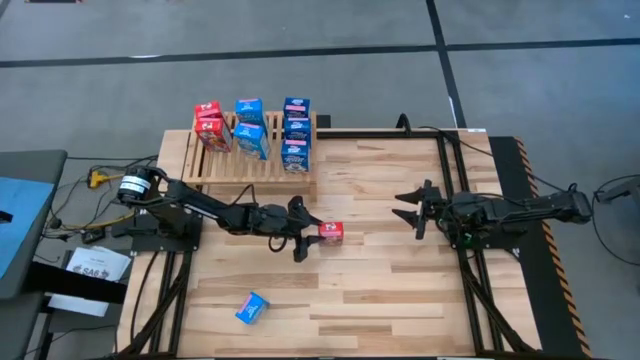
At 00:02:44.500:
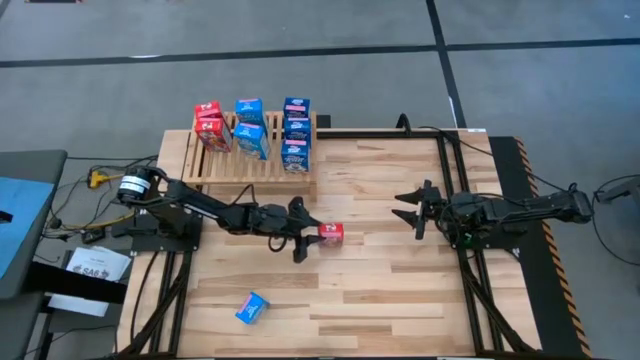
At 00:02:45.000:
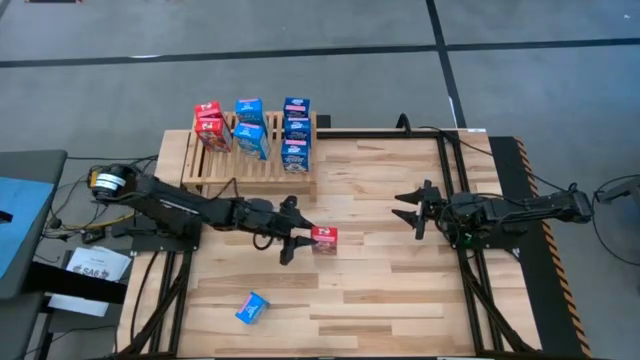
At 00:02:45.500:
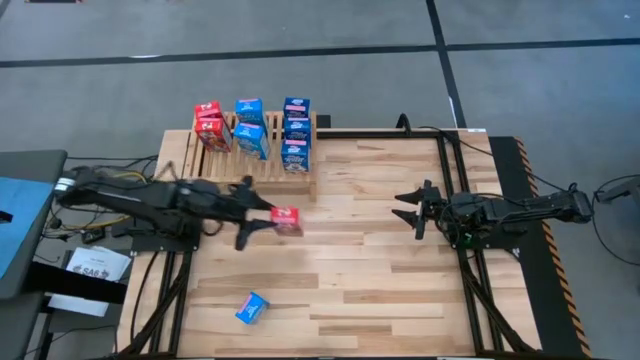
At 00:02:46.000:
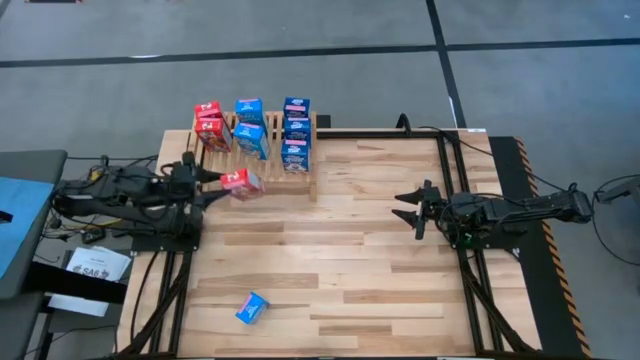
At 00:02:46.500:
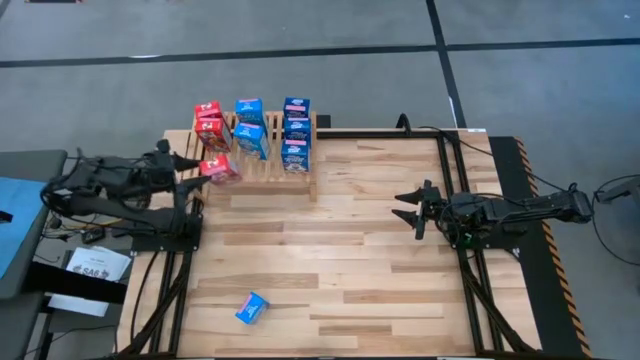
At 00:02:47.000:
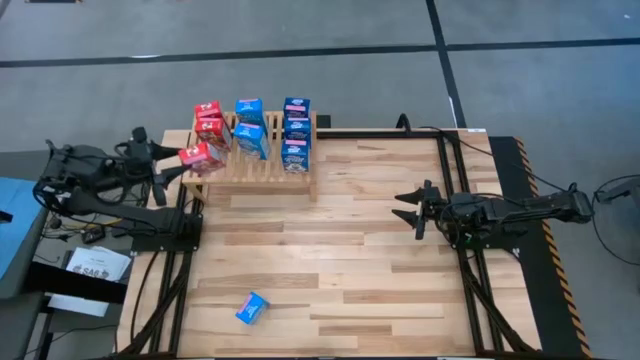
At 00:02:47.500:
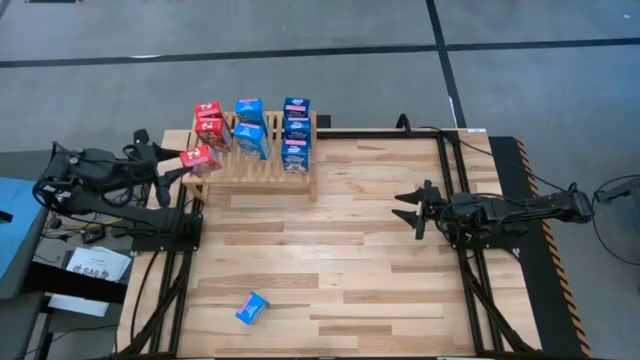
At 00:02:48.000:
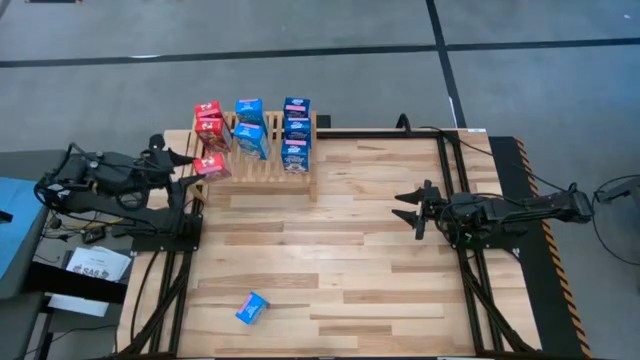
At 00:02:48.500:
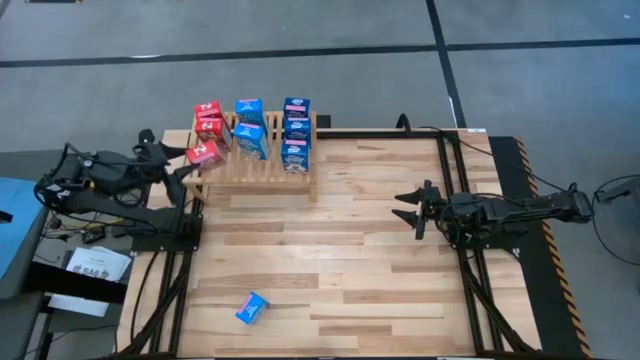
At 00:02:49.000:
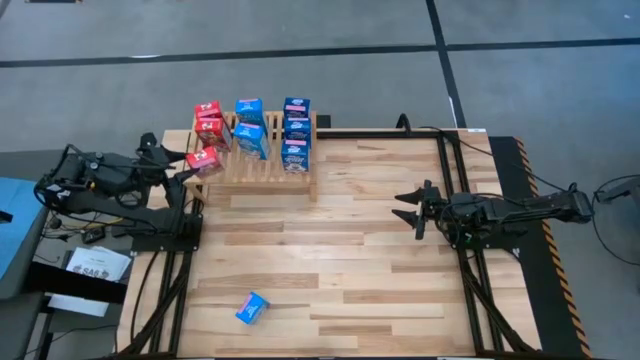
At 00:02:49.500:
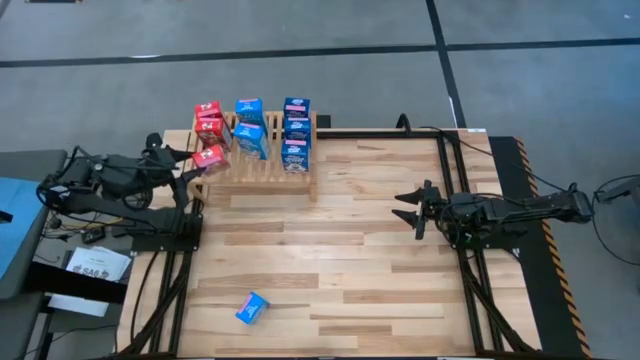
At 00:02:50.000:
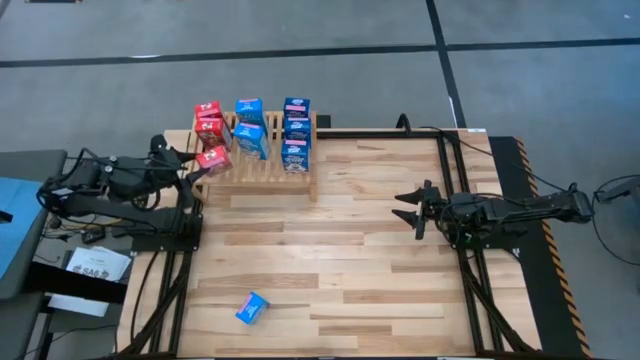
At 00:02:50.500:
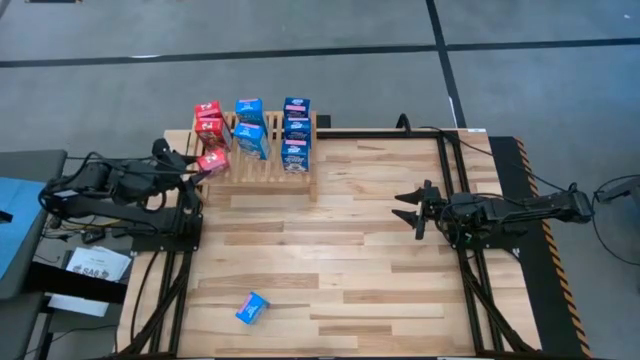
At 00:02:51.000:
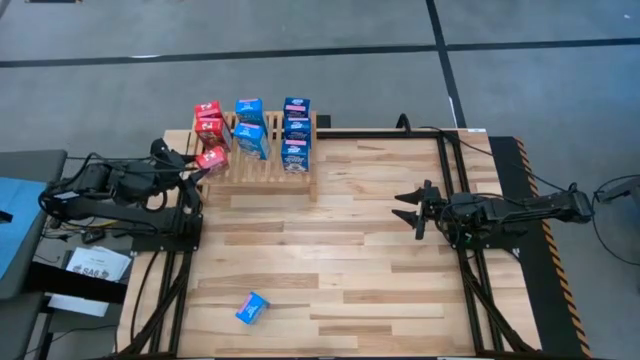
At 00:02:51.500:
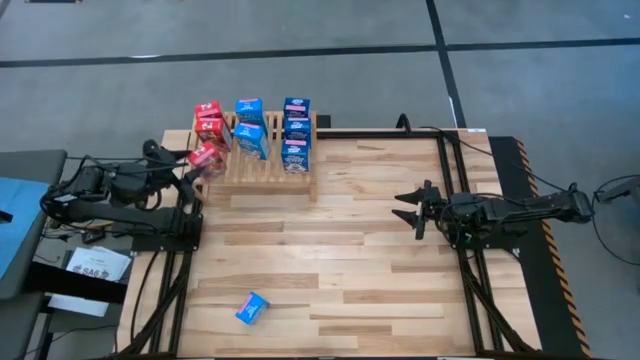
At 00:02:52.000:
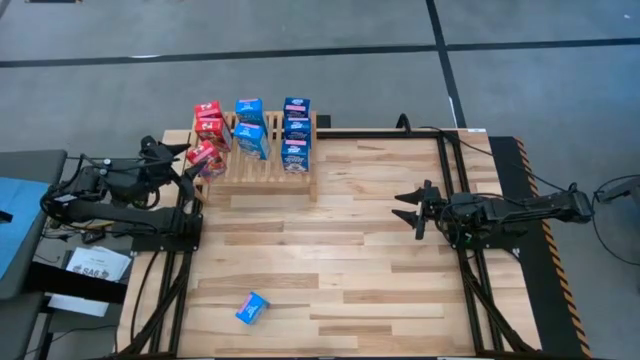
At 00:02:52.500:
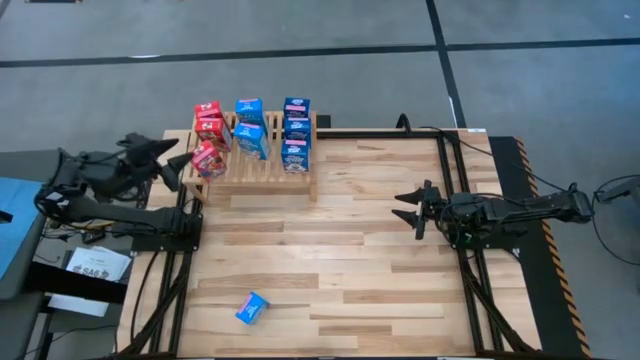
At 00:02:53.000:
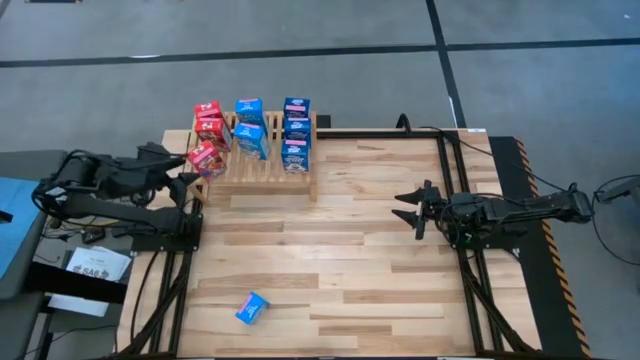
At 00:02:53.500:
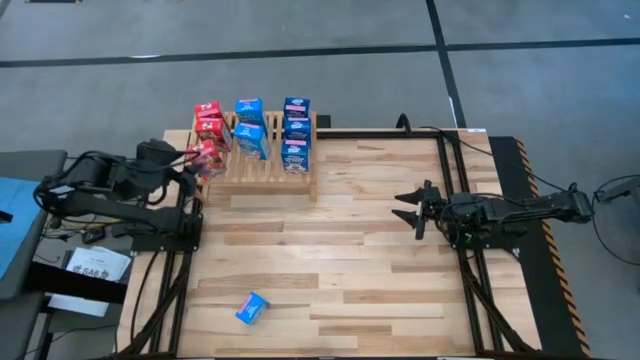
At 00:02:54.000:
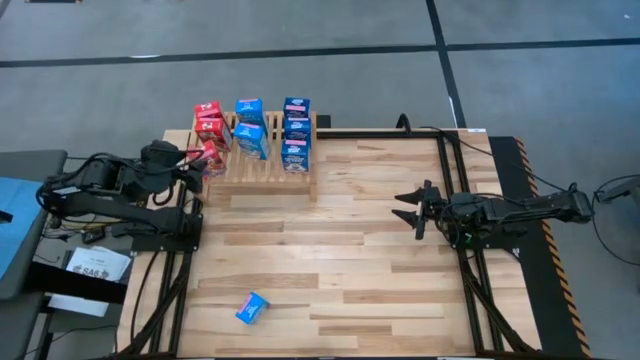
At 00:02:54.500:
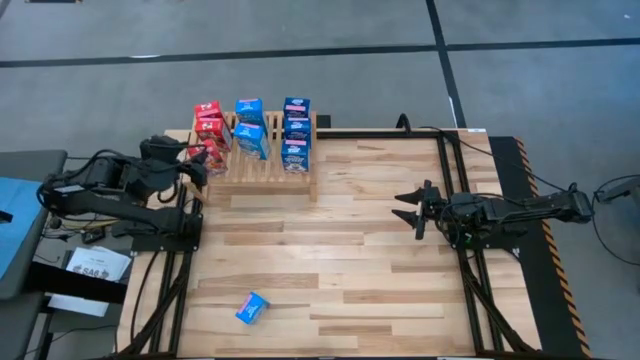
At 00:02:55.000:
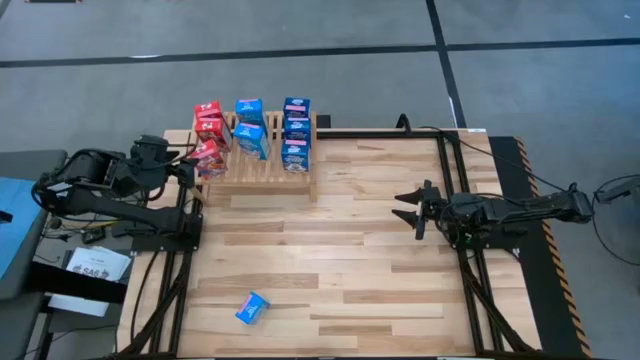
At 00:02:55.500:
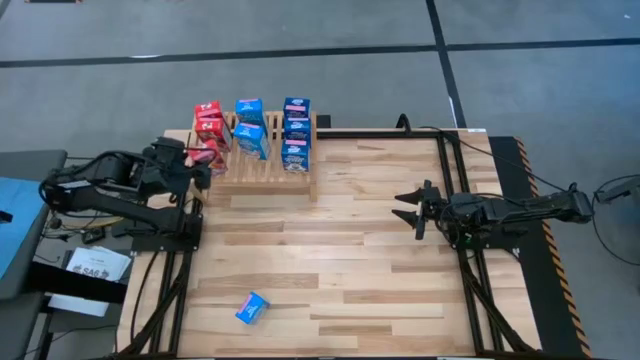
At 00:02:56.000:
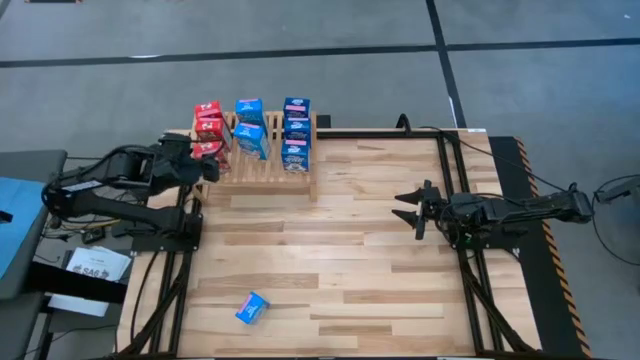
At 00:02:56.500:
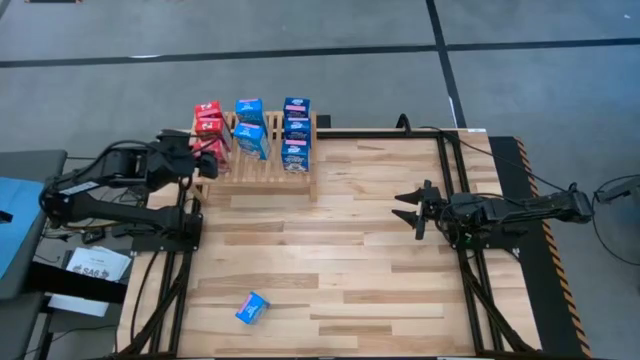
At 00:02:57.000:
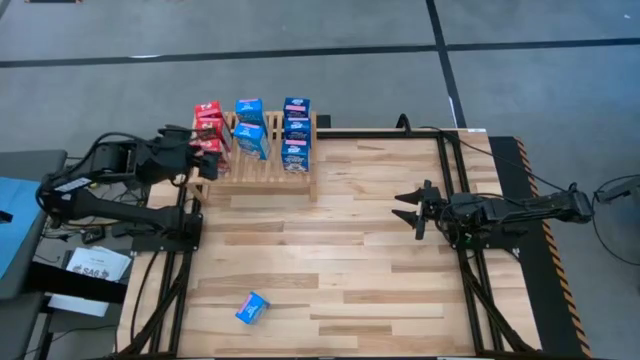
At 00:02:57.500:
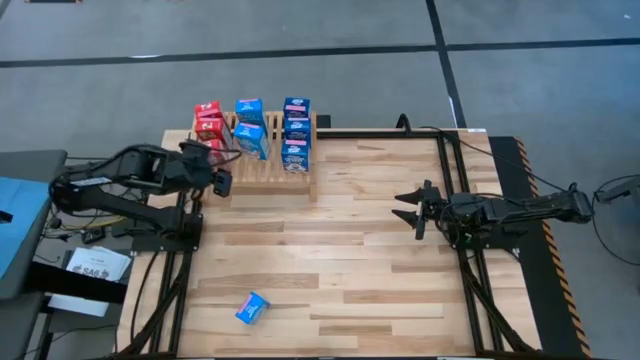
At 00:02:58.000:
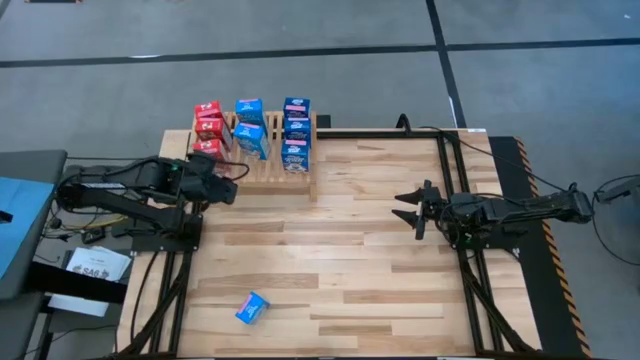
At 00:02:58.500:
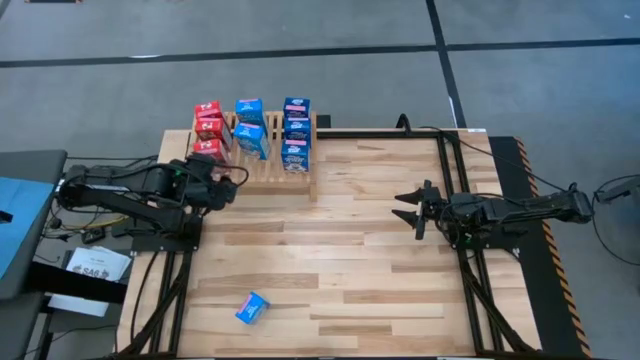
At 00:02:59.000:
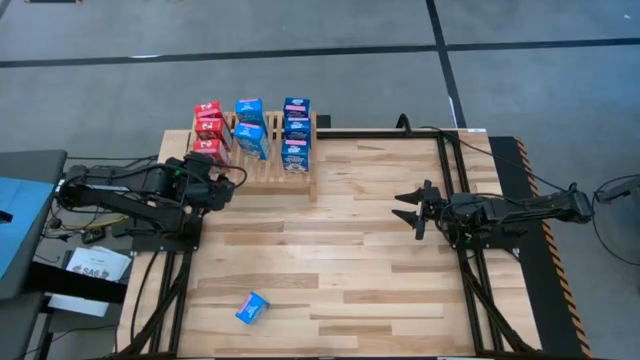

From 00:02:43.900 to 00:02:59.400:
Task: Stack cereal on shelf
Put the red cereal box the aligned with the other cereal boxes on the shelf

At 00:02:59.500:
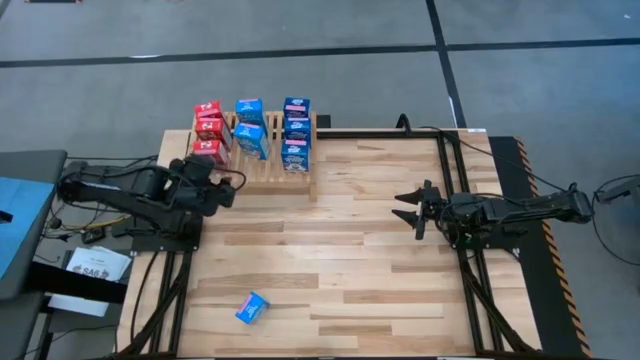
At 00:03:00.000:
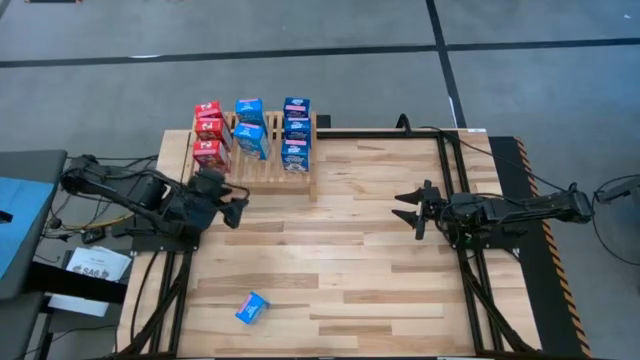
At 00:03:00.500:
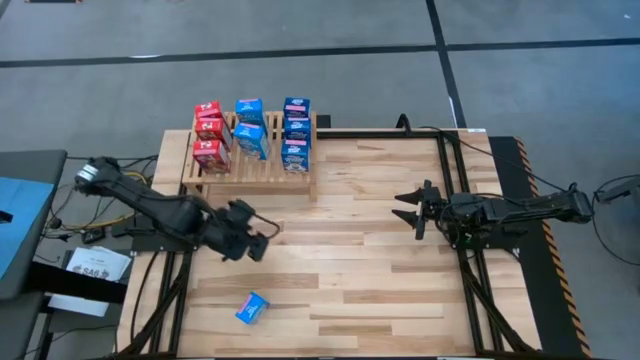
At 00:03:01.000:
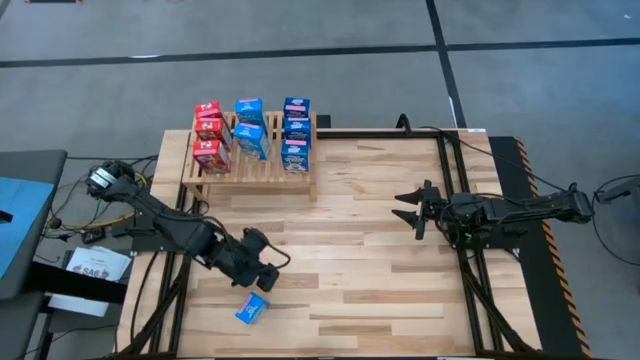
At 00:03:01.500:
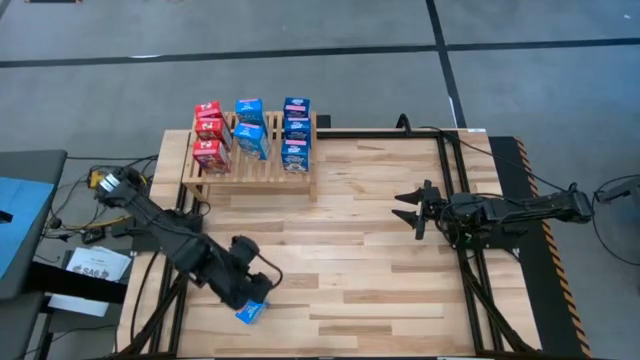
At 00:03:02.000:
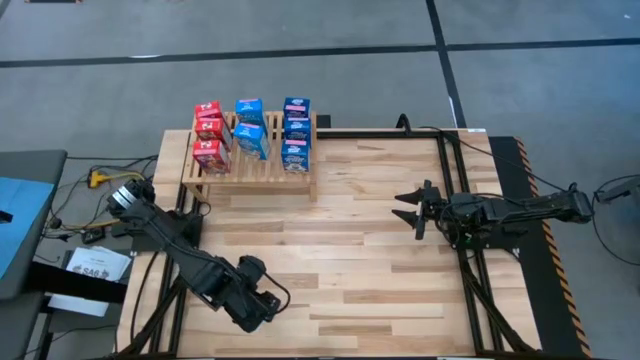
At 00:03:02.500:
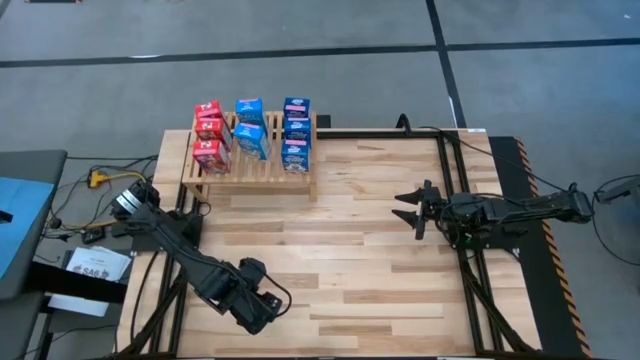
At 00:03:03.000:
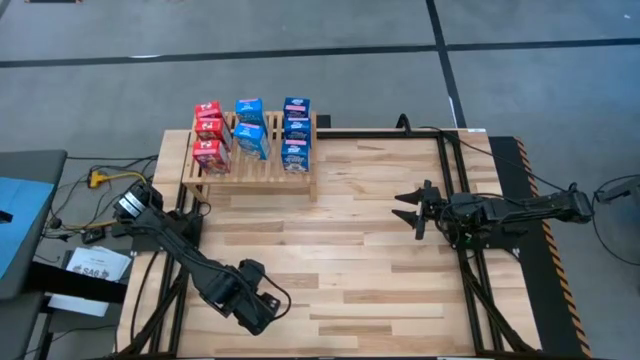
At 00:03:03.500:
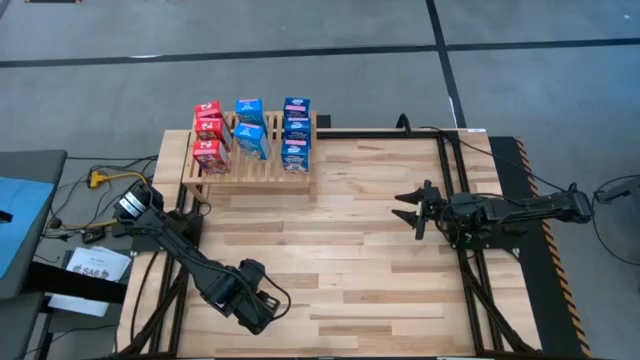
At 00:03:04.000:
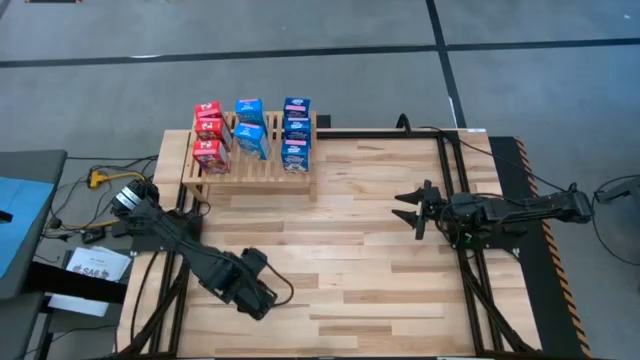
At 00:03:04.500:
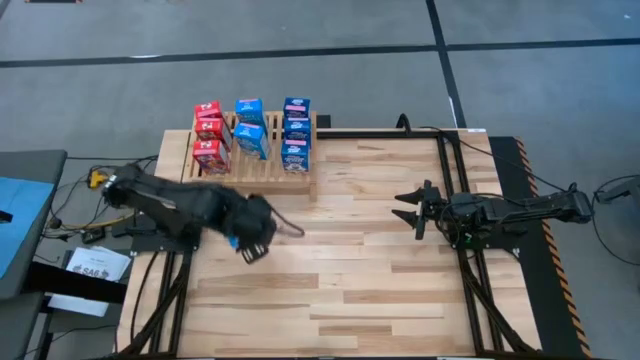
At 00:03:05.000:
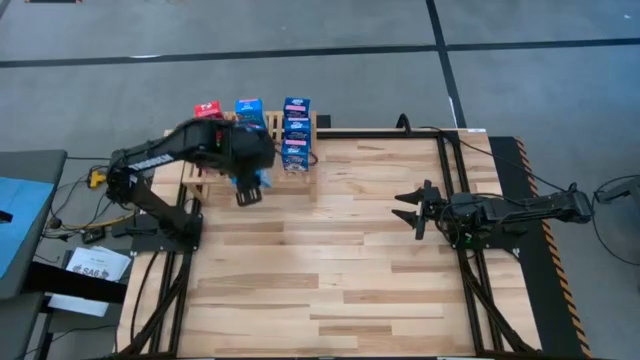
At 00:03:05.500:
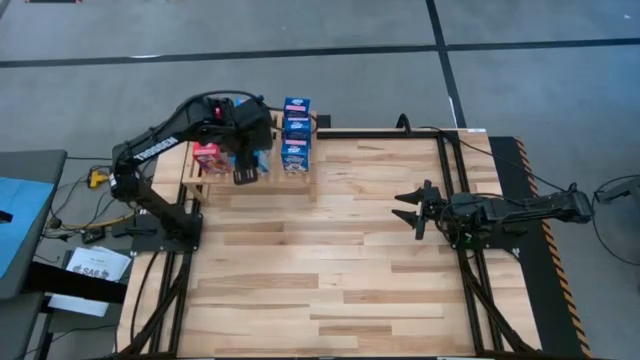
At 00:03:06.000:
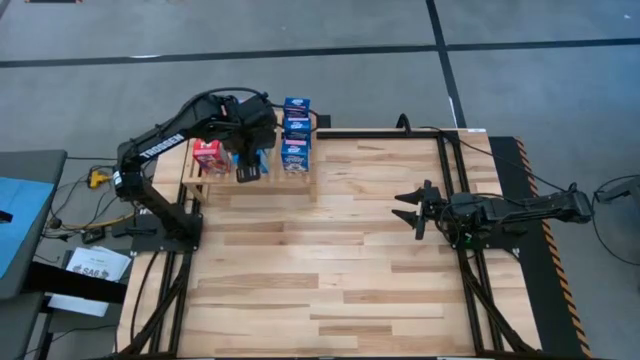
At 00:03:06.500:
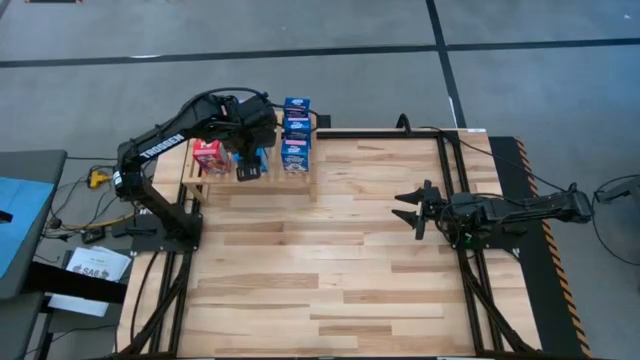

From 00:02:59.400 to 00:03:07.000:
Put the light blue cereal box the aligned with the other cereal boxes on the shelf
